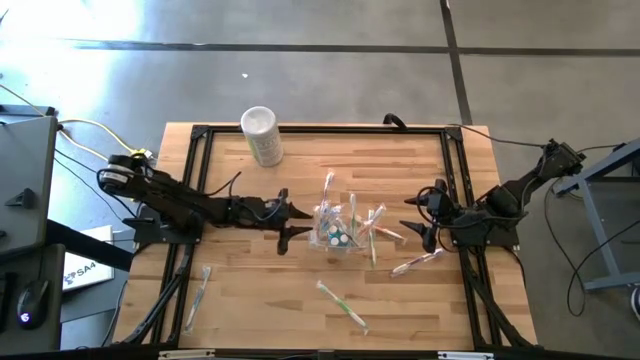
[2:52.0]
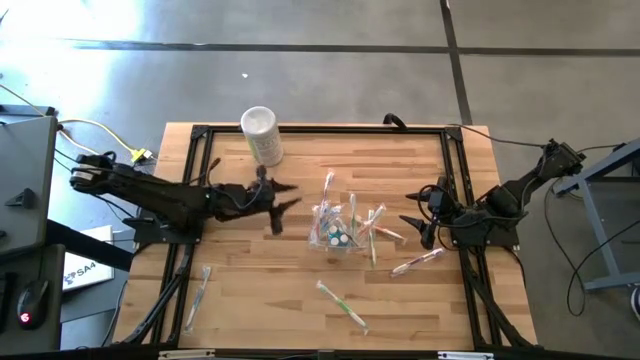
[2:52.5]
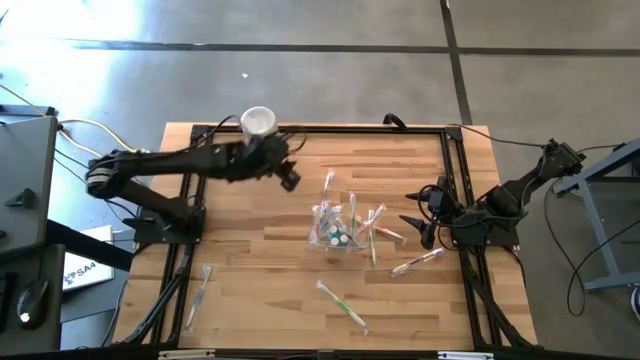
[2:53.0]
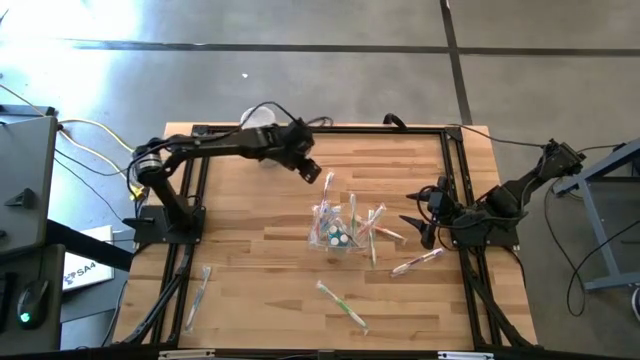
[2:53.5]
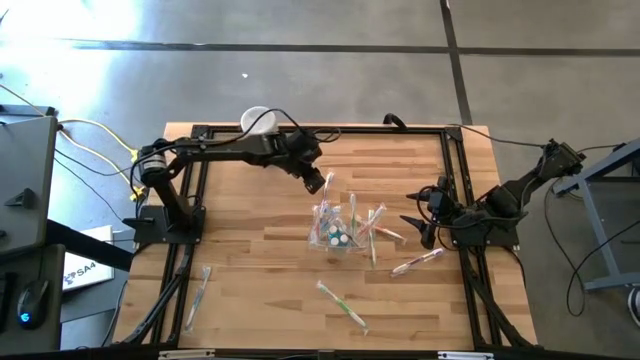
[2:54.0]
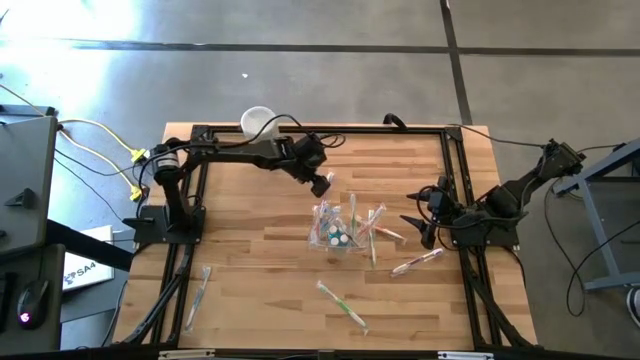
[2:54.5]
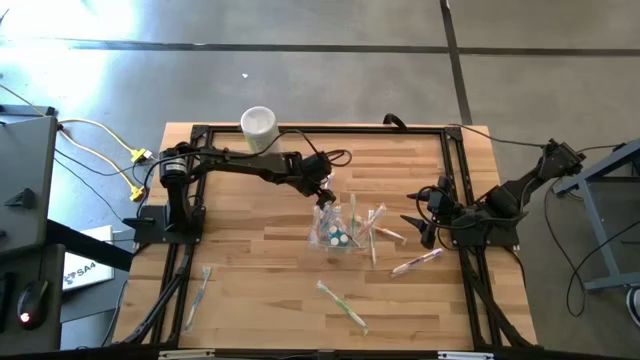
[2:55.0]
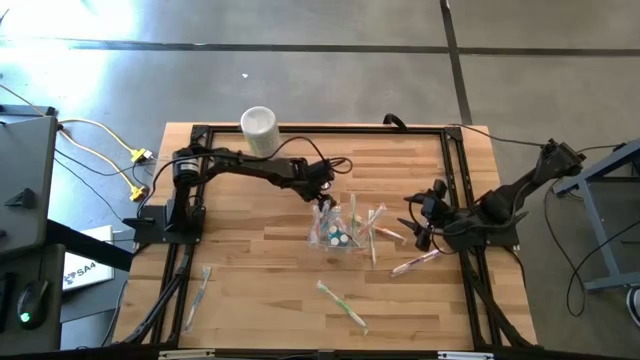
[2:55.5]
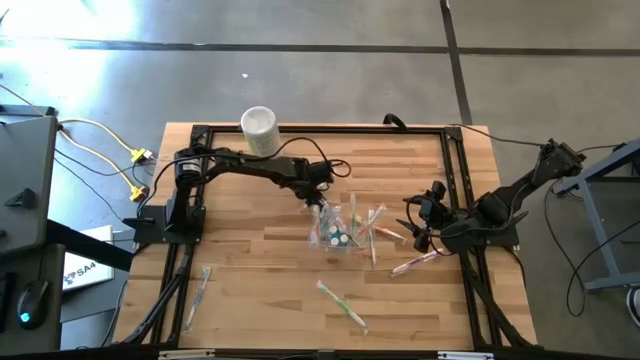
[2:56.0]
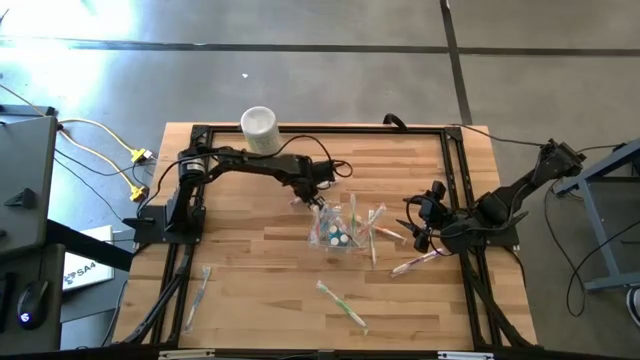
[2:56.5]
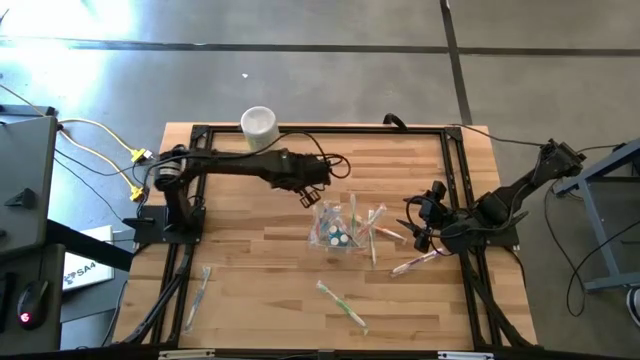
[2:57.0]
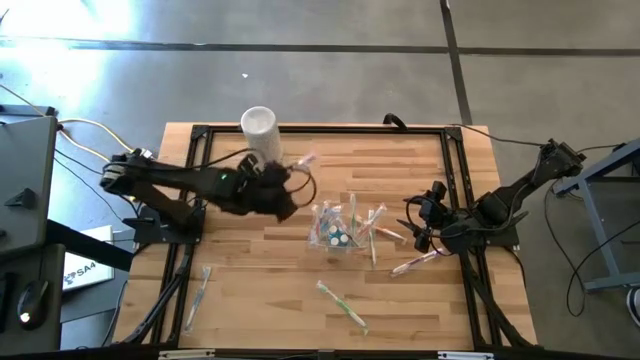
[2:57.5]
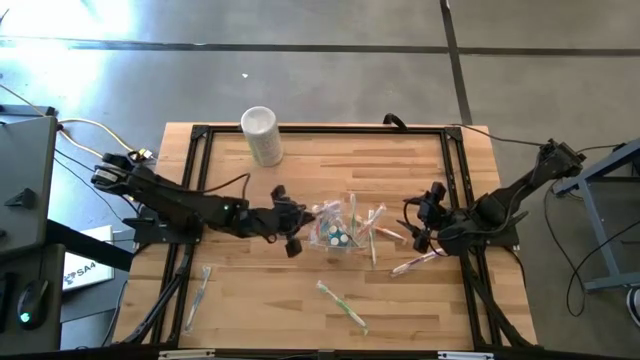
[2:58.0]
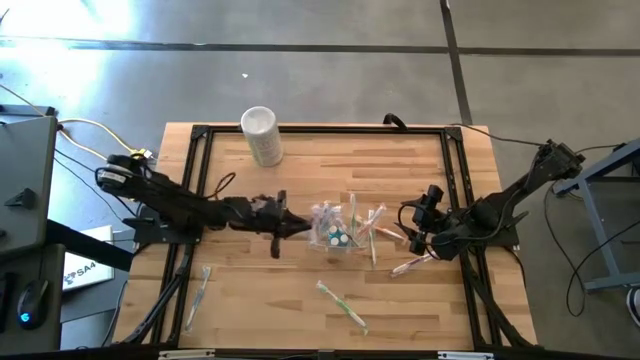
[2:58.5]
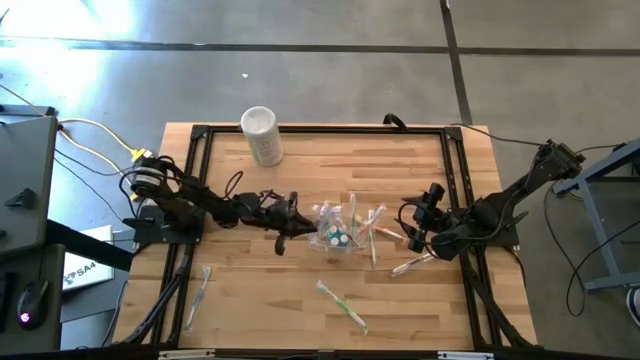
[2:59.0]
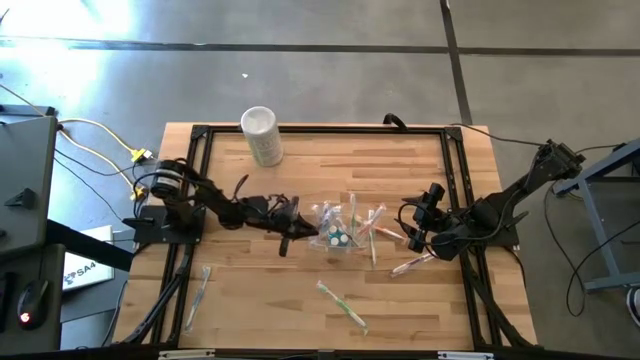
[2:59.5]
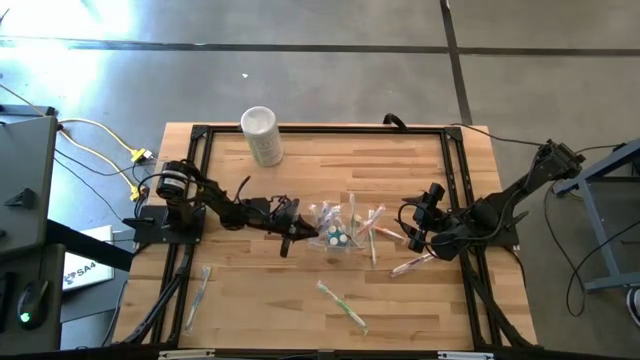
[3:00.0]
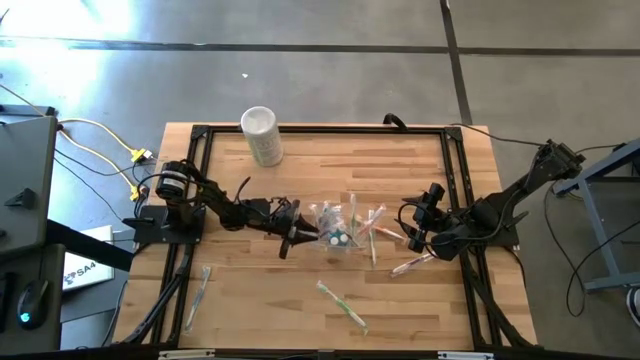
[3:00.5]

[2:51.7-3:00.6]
Task: Pick & Place toothbrushing station
Put the violet toothbrush into the left section of the transparent organizer

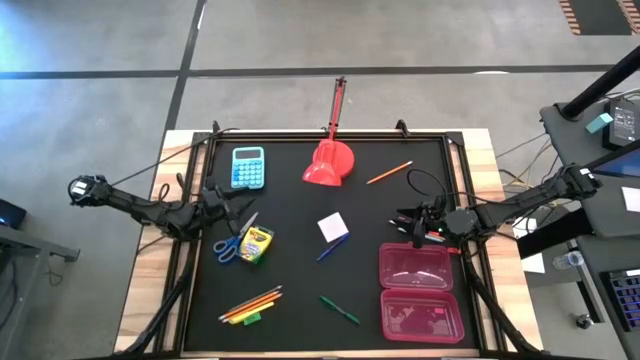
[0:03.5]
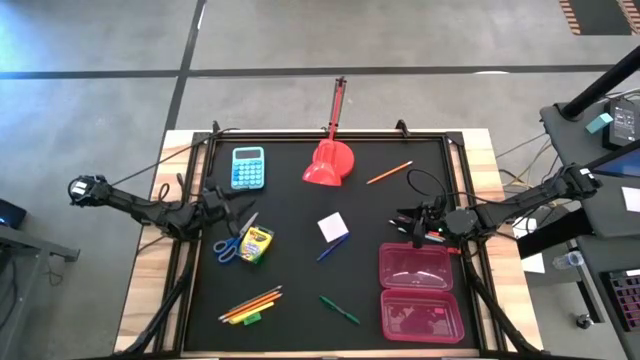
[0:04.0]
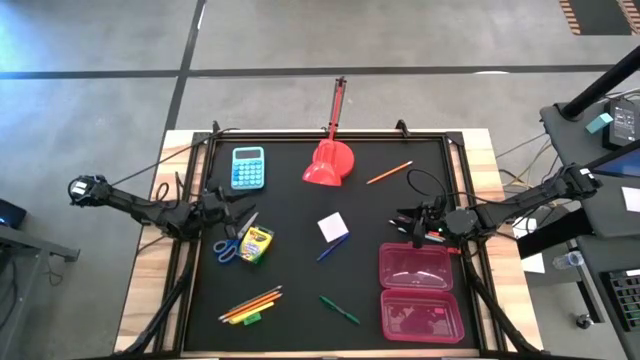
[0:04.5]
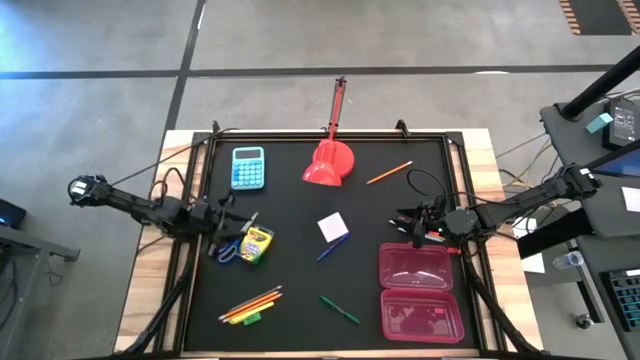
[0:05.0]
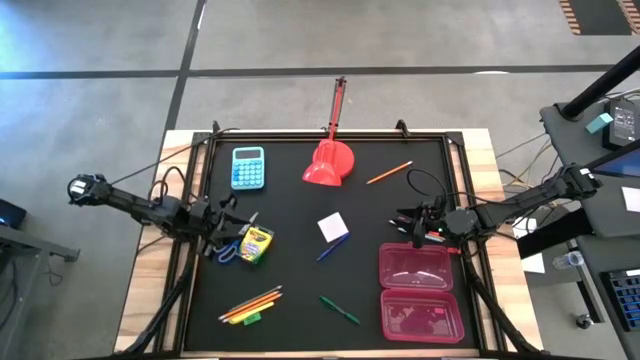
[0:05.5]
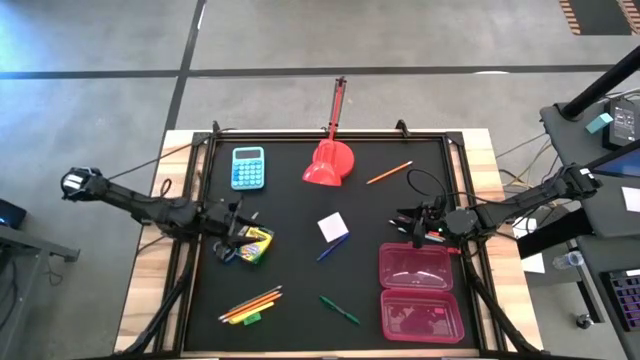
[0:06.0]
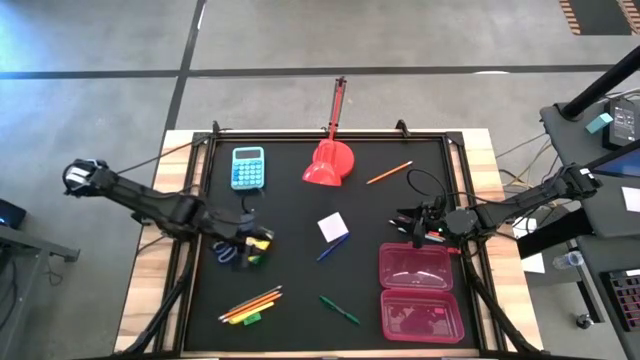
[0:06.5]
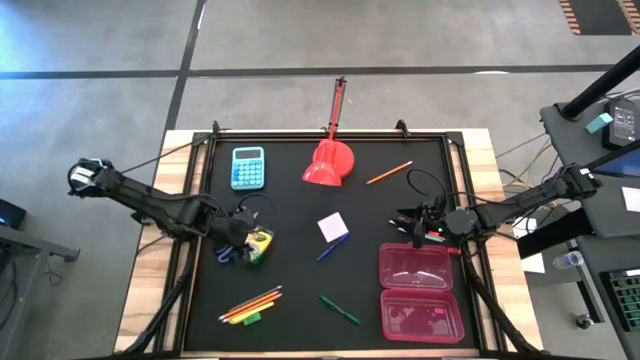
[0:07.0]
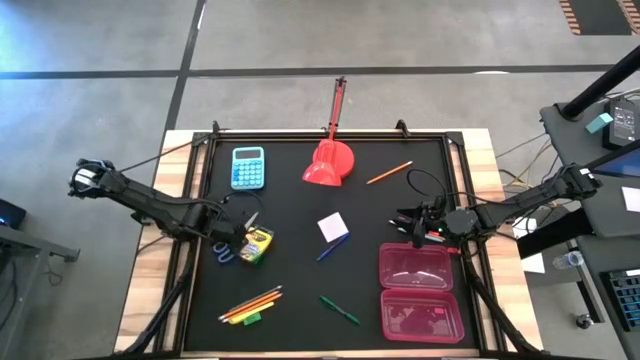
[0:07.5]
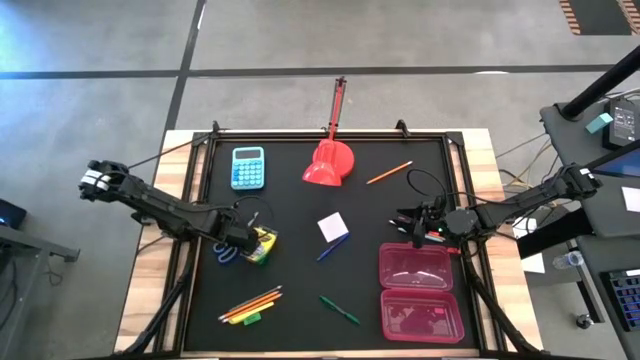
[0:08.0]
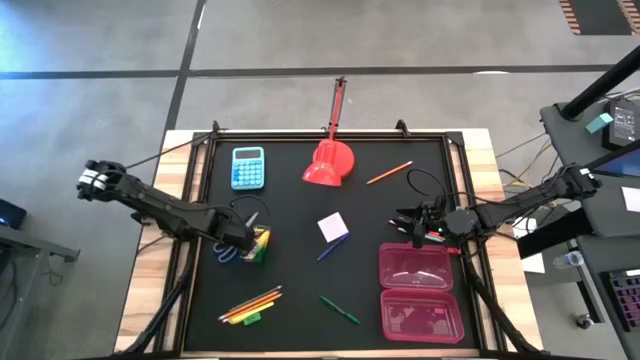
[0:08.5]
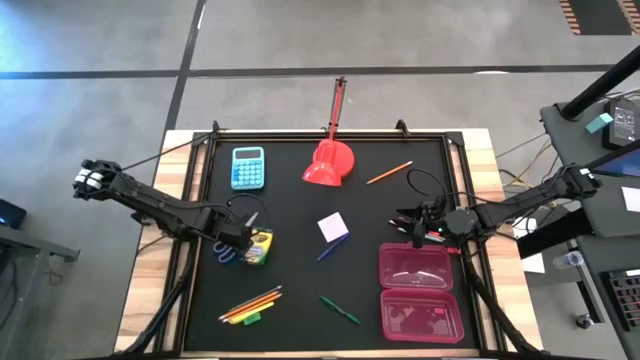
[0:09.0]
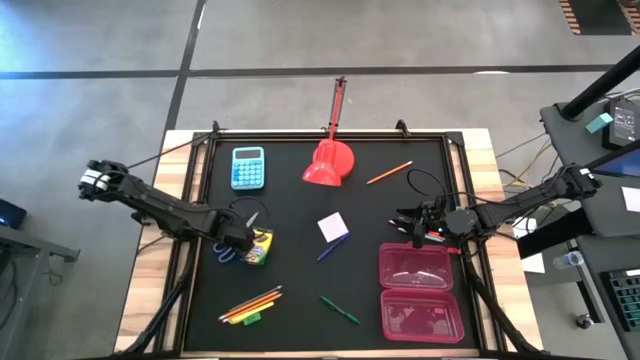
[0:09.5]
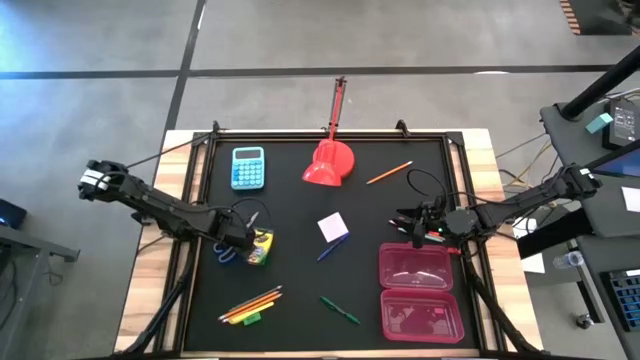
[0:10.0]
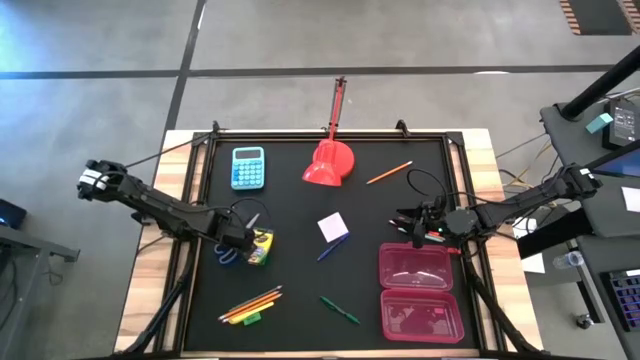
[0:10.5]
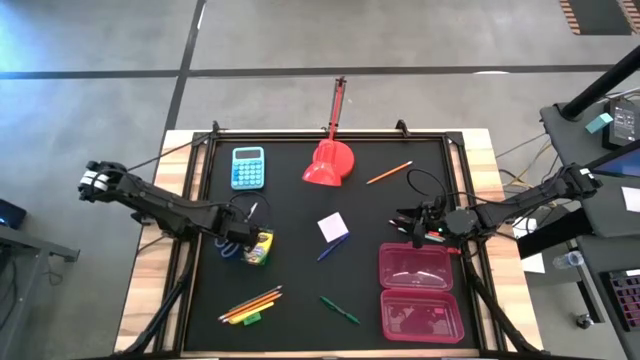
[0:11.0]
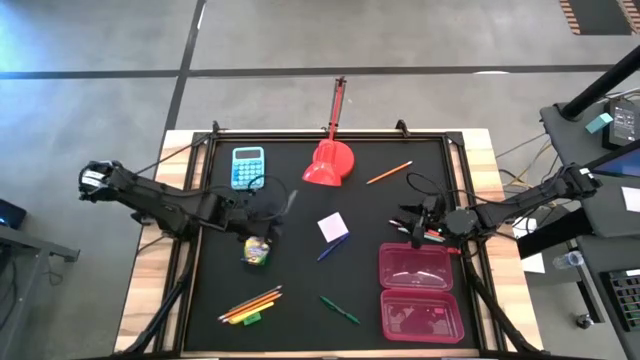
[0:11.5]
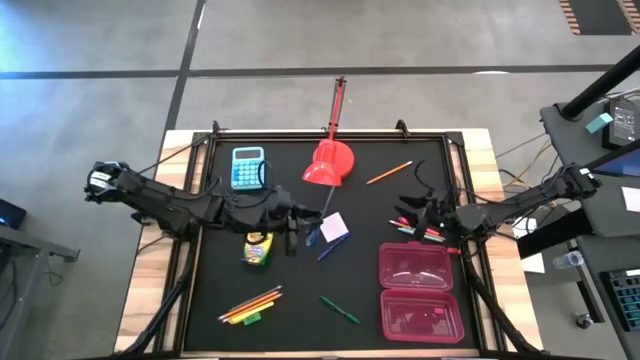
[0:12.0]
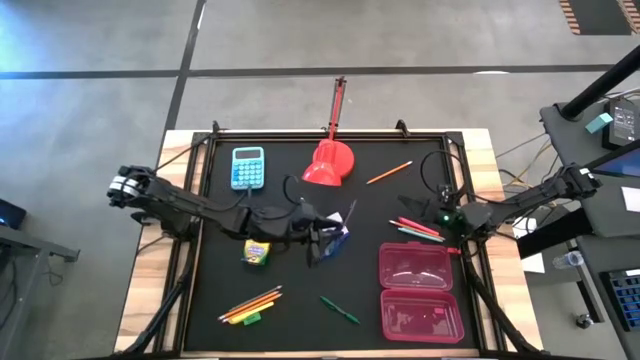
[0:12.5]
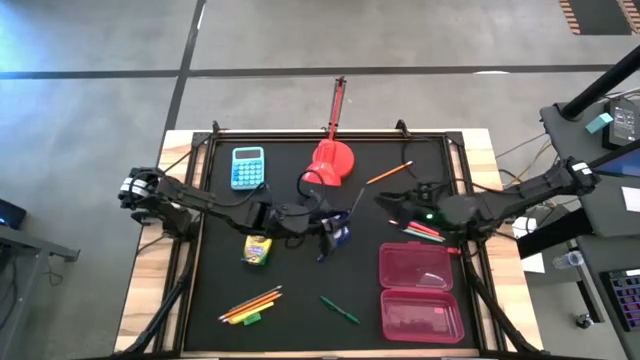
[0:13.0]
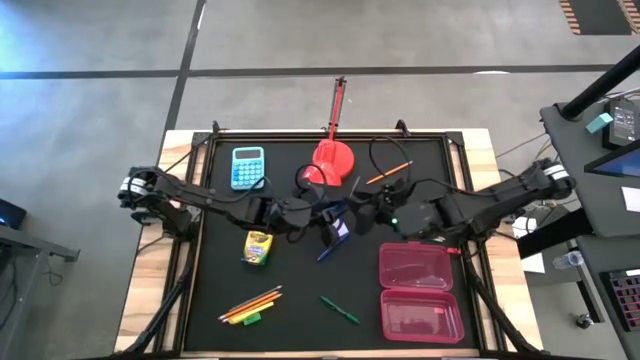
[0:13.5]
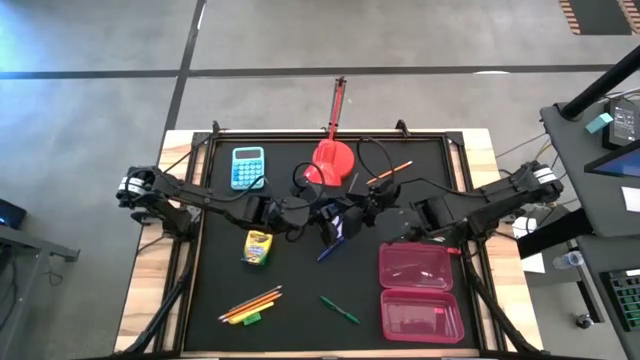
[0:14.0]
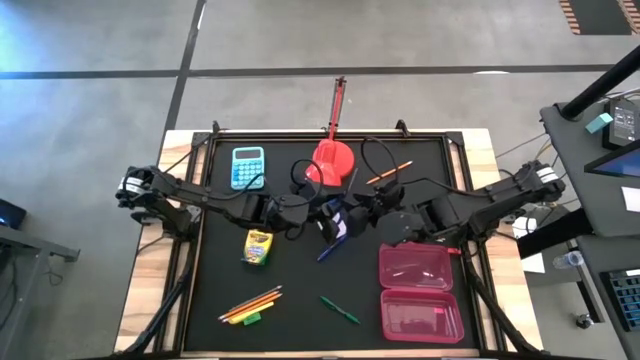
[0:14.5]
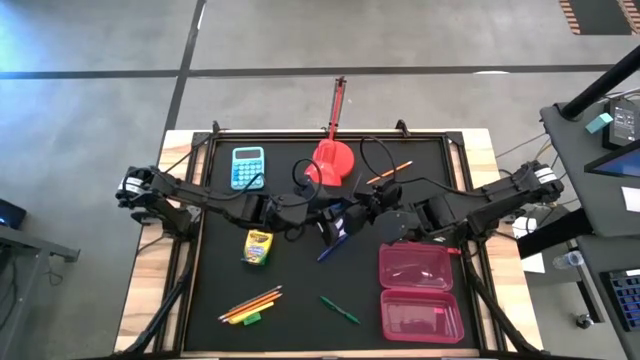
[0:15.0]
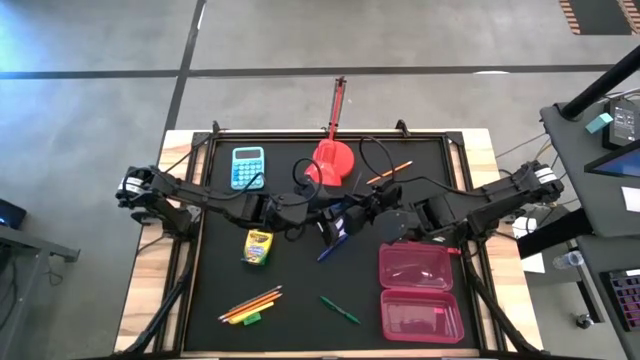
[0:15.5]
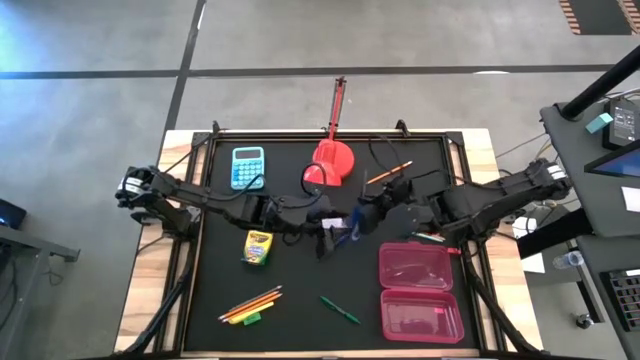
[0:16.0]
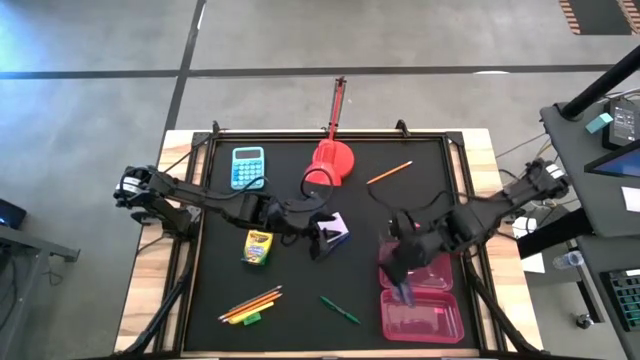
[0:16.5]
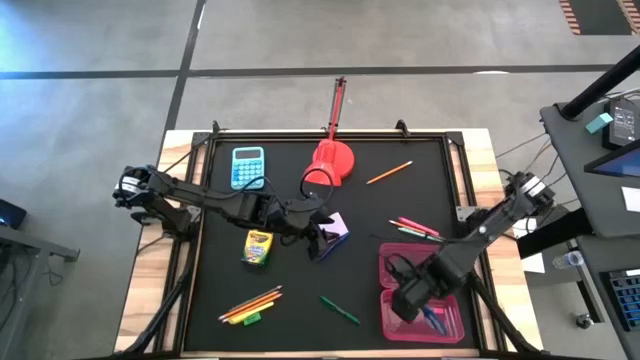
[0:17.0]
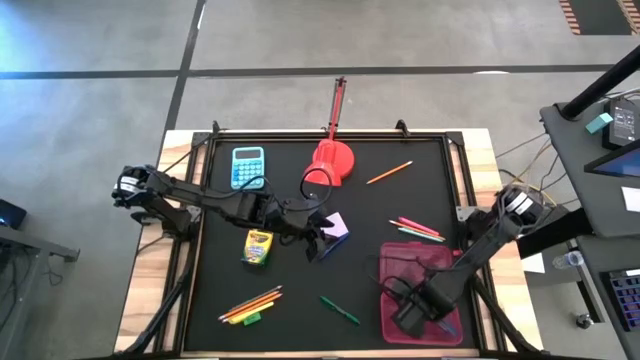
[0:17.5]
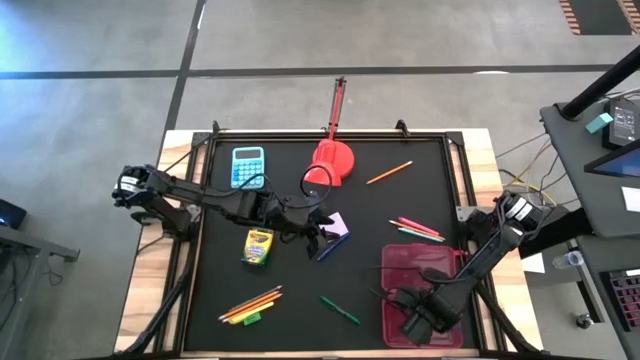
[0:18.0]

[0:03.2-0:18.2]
Task: Pack school essentials
Put the blue scissors into the pink supply box
